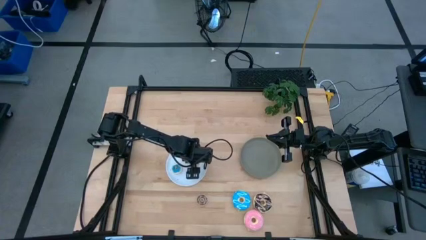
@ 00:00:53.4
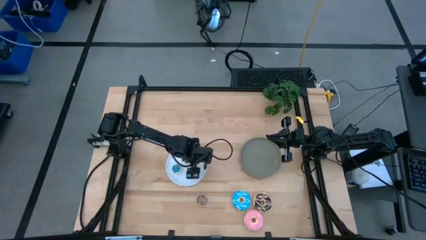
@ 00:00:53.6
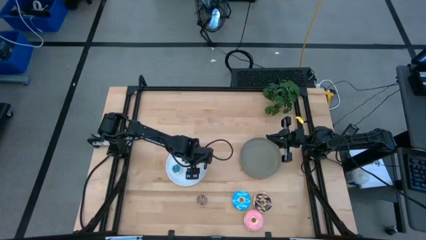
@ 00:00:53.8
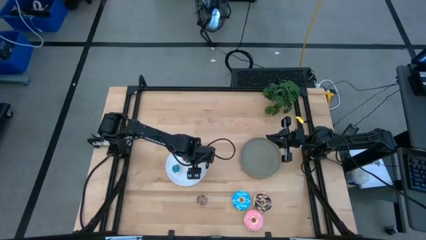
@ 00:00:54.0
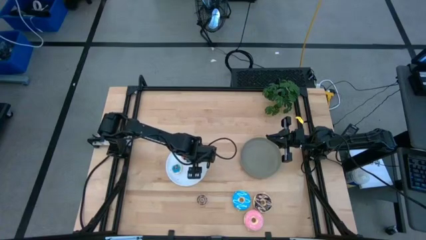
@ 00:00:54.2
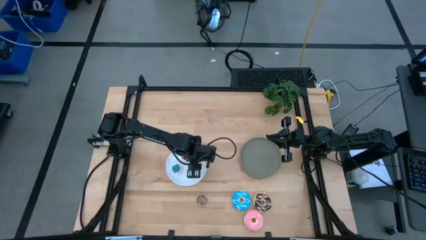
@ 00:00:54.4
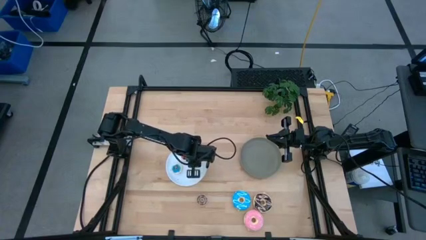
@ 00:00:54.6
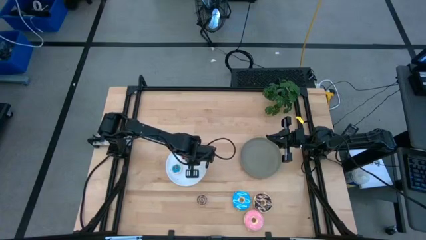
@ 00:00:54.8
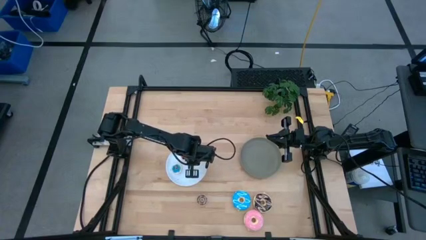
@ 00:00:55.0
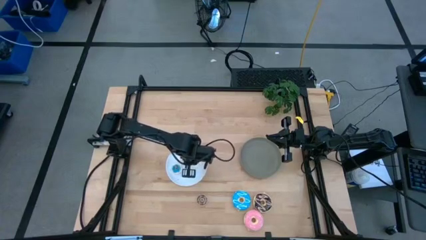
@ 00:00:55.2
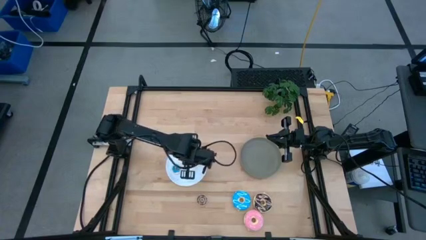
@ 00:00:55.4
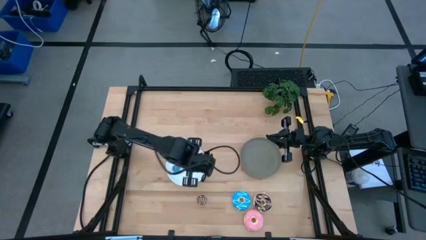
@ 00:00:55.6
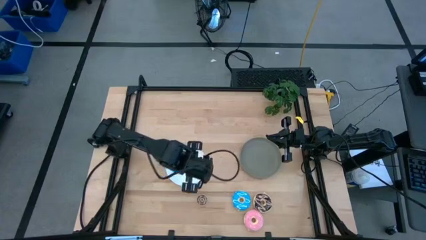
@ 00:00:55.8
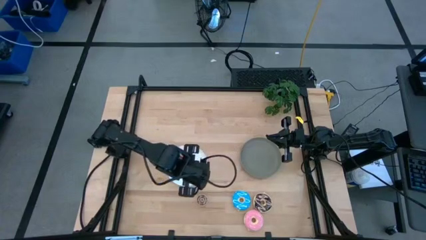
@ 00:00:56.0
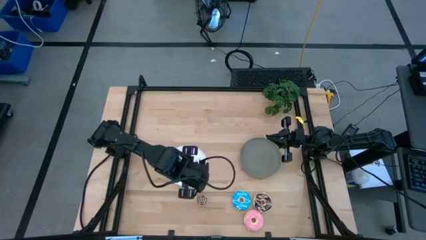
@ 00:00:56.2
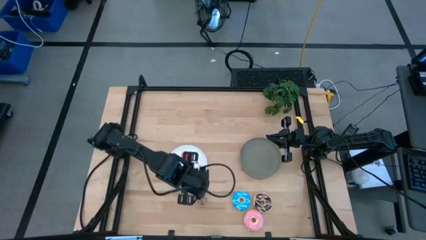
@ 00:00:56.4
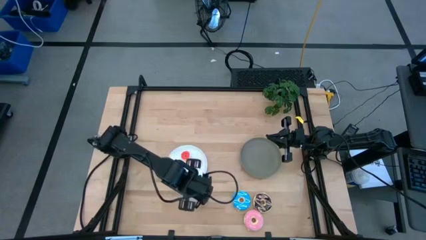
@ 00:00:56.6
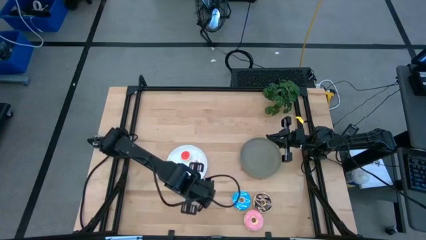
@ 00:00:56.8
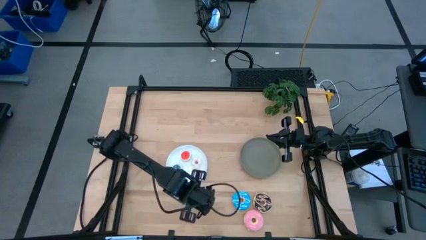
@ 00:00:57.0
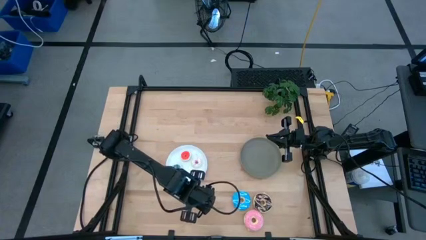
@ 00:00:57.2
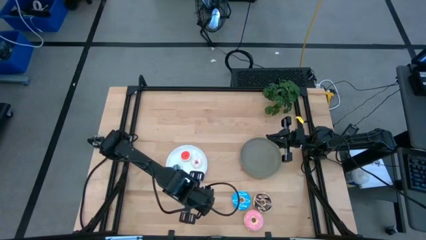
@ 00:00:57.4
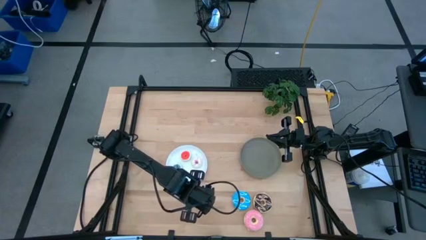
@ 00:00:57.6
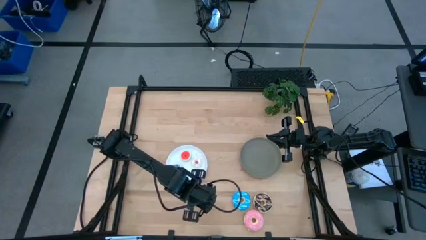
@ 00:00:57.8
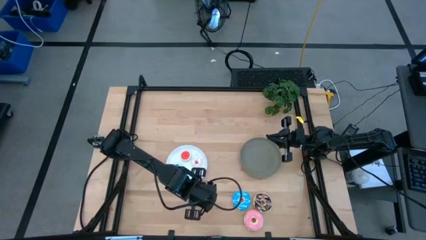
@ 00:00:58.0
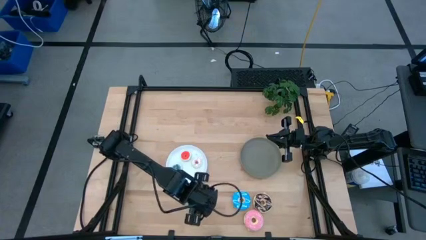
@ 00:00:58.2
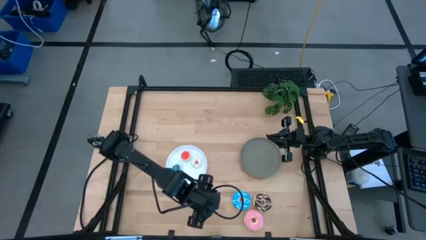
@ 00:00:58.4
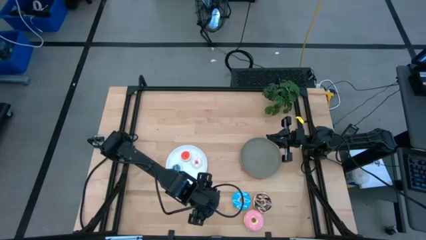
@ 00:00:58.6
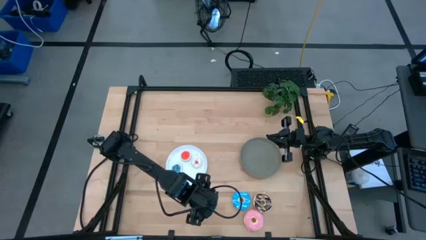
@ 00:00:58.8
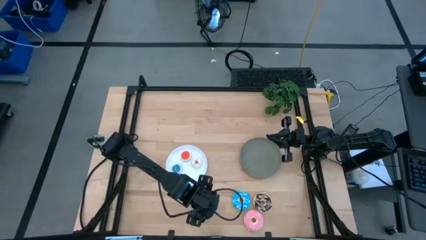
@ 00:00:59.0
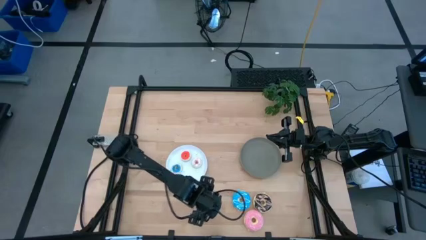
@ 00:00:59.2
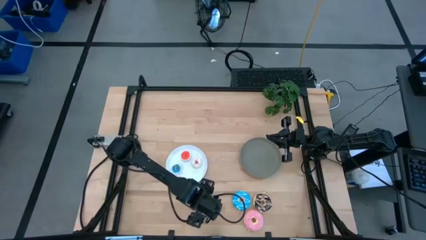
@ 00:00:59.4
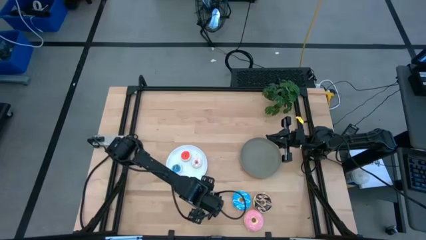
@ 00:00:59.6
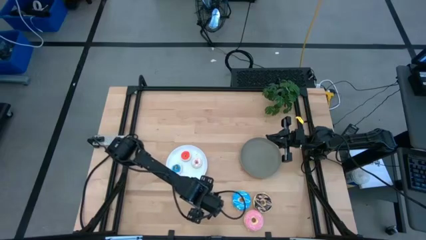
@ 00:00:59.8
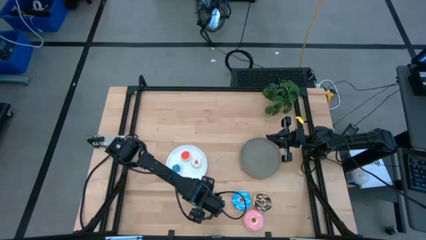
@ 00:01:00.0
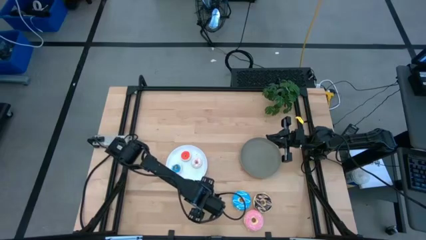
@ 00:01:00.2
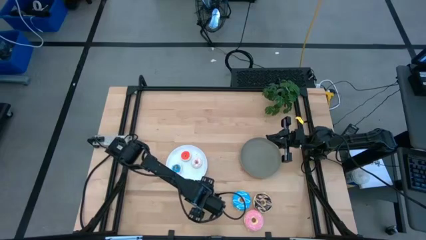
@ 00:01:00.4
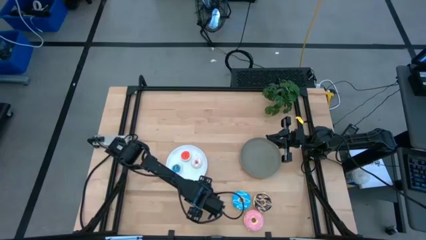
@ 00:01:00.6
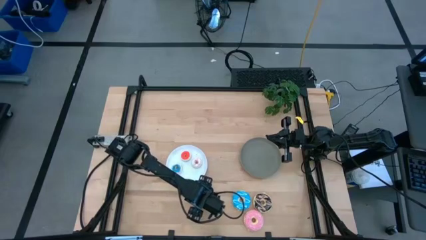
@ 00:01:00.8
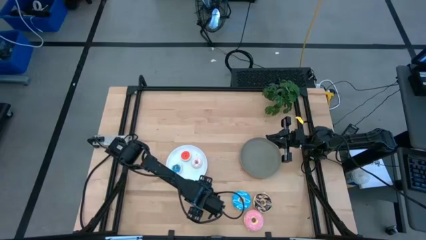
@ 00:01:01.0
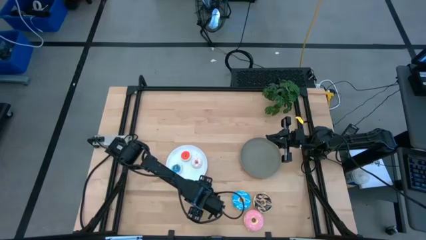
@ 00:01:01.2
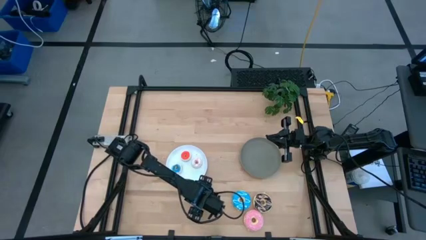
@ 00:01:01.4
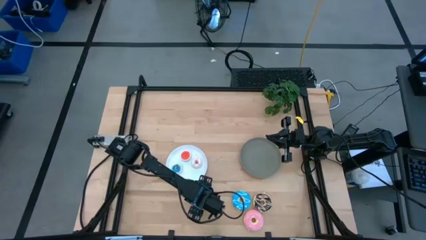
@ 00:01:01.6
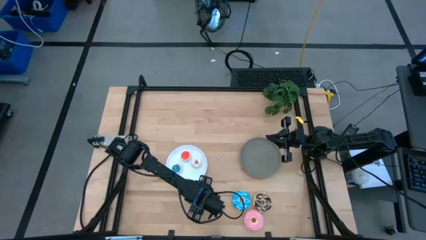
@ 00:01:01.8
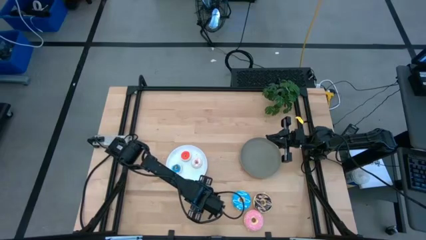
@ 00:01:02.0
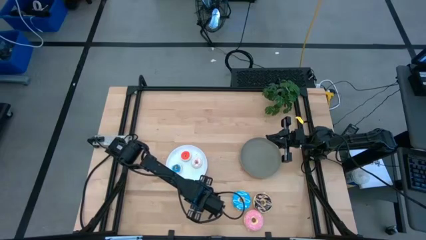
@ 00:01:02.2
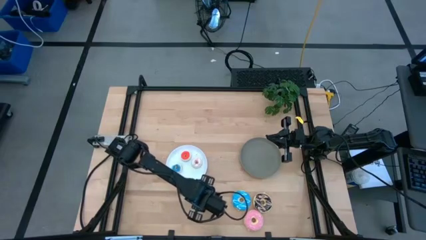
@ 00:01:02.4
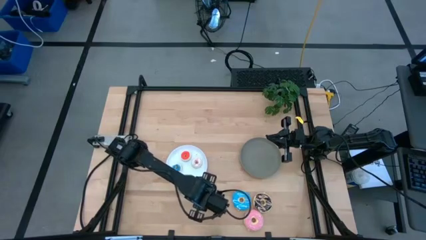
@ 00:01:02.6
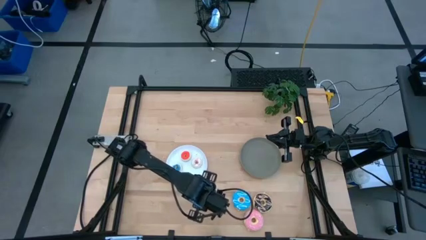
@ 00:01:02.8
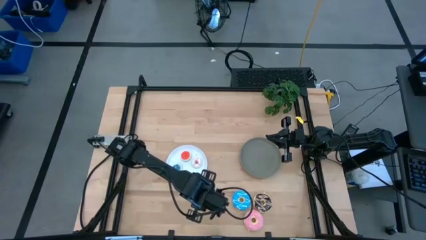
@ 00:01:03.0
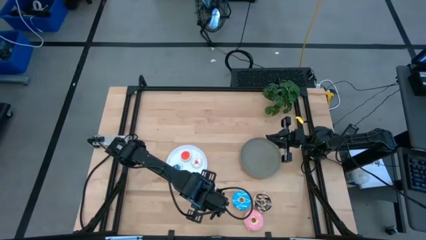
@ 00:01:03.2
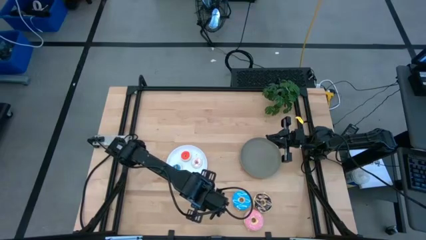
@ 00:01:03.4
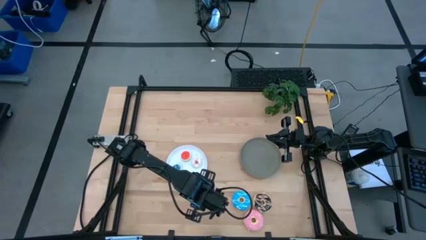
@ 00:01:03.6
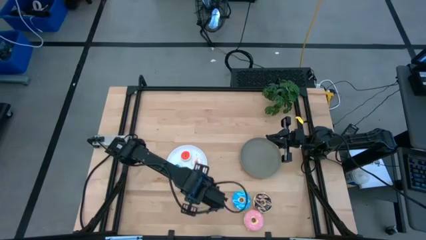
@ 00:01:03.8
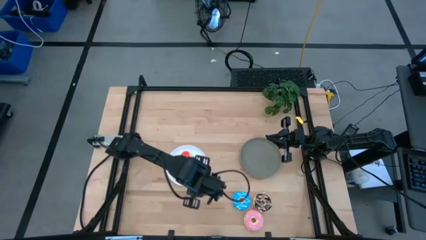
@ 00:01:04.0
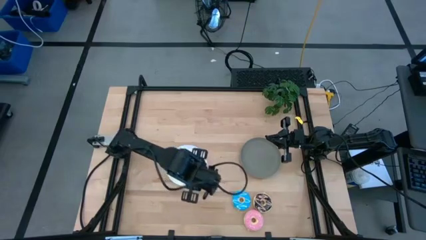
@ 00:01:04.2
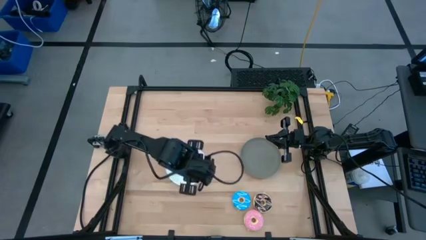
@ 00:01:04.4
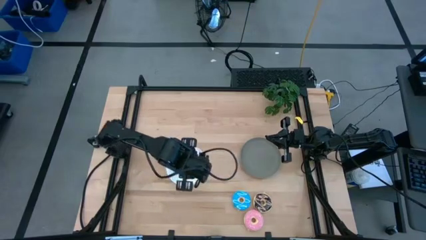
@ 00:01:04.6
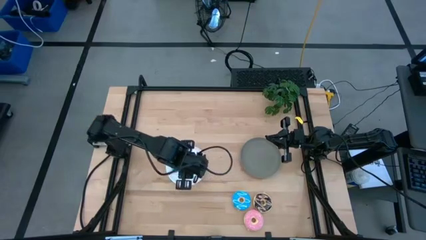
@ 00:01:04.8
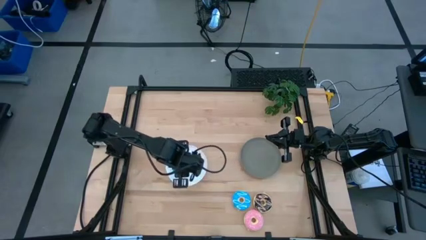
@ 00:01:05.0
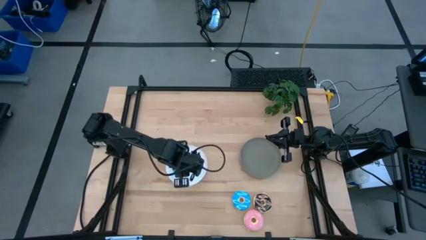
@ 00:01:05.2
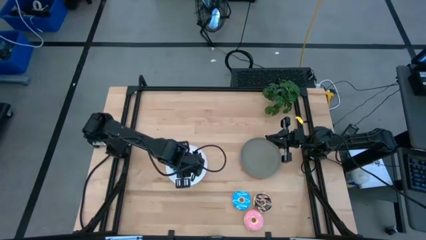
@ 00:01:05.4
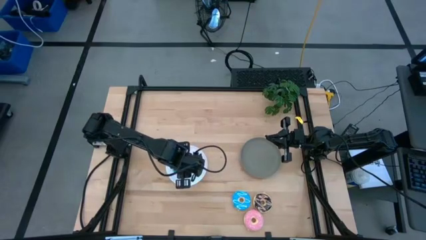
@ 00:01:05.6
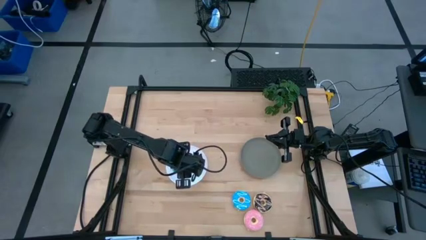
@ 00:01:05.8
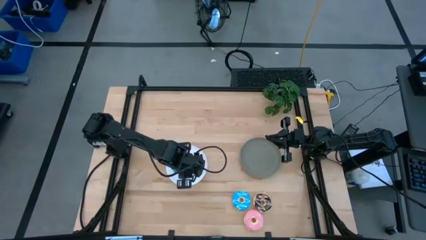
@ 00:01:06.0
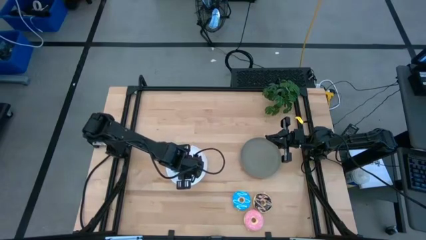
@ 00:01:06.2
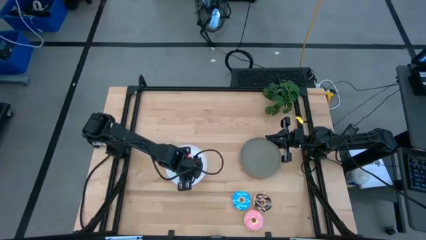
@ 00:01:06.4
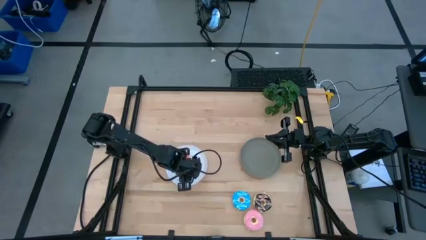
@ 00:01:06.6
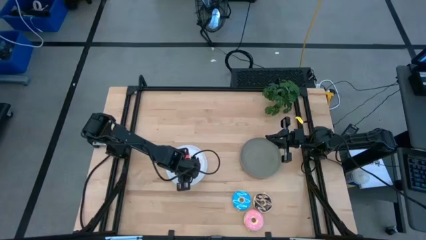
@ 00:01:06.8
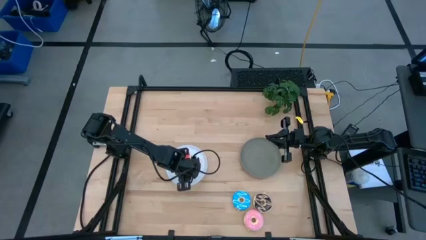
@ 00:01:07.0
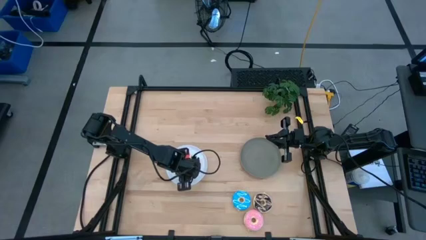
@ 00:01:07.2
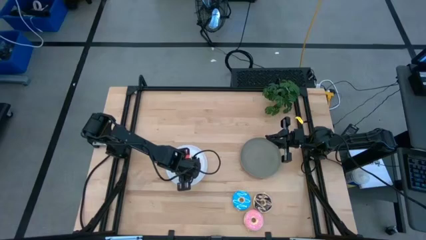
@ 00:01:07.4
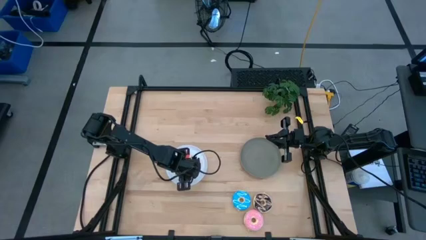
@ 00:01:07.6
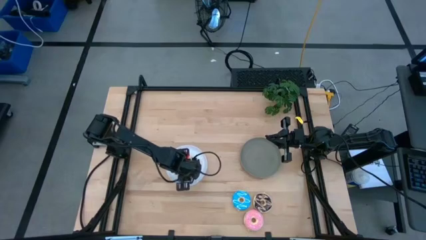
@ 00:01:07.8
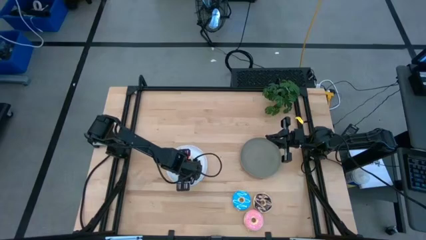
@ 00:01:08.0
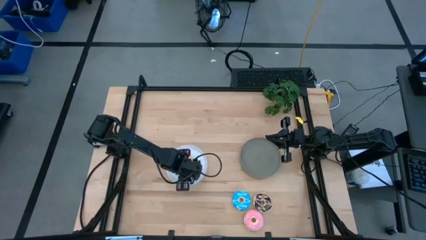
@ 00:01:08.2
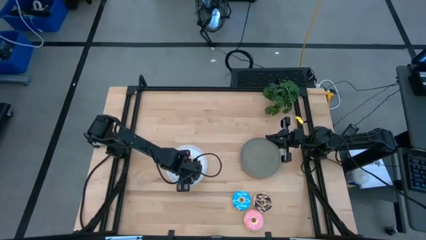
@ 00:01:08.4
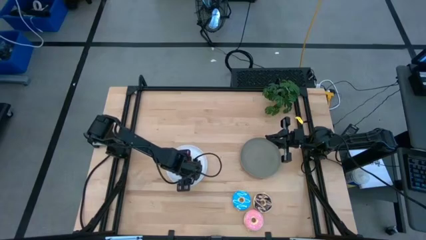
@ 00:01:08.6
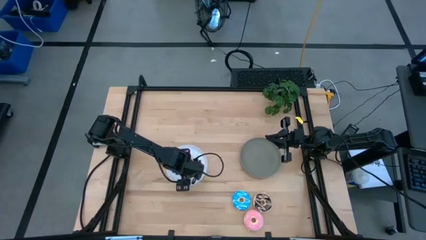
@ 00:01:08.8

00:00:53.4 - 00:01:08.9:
Task: Pick & Place donuts
Put the small brown donut on the white plate

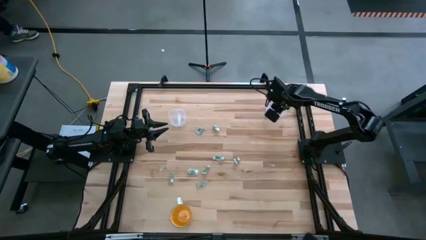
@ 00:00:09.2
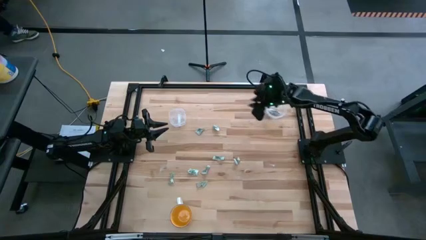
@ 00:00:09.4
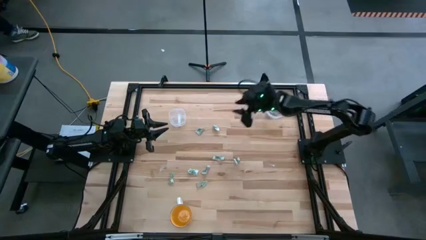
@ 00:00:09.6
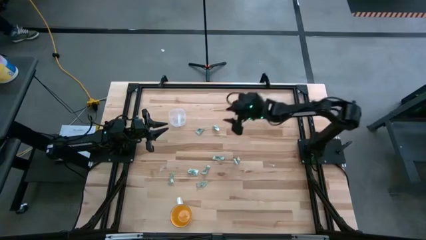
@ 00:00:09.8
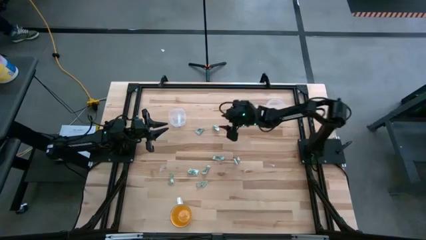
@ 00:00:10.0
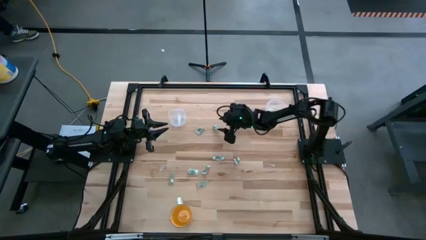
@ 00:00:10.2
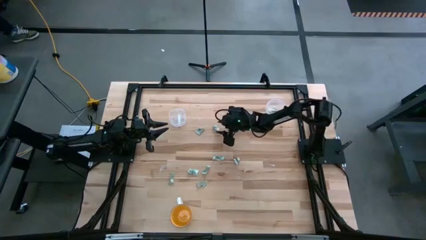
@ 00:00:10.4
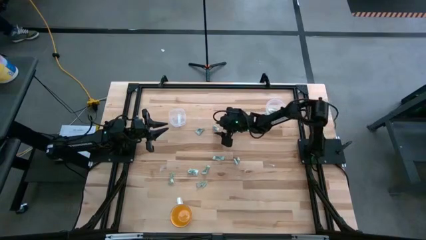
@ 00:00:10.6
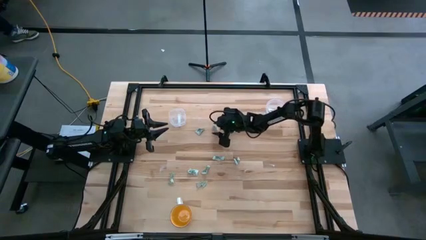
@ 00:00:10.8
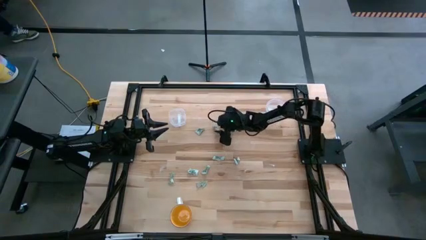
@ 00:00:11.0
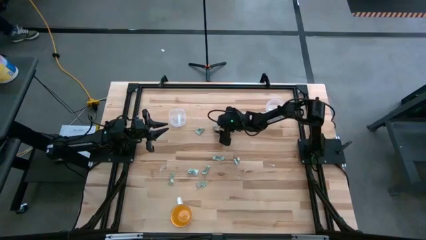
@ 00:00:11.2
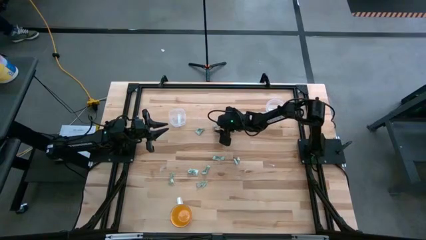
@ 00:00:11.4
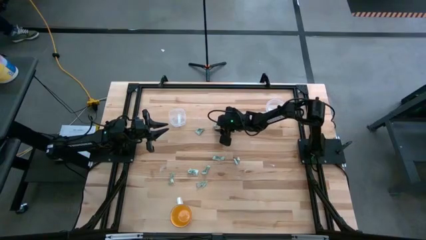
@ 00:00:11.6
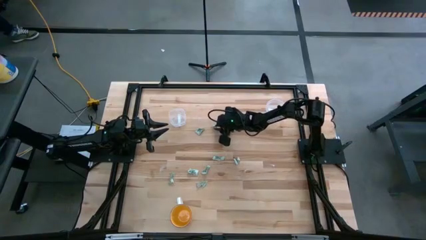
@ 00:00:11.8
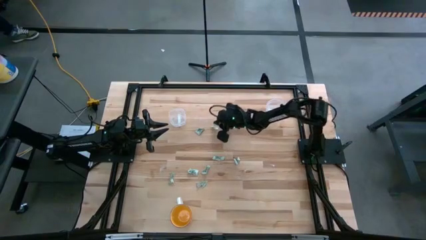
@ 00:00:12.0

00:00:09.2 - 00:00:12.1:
Task: Pick and place items into bin
Put the stevia packet into the right transparent bin
